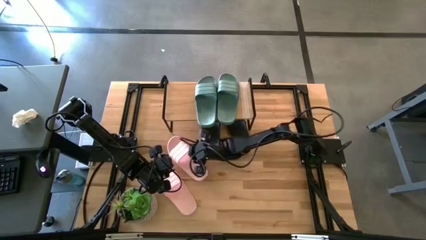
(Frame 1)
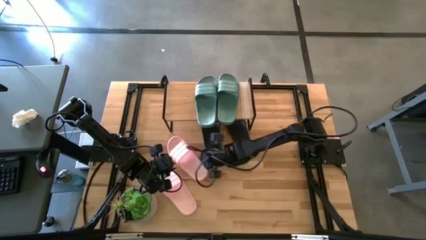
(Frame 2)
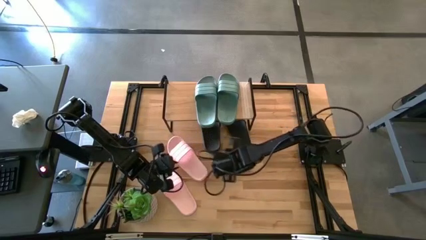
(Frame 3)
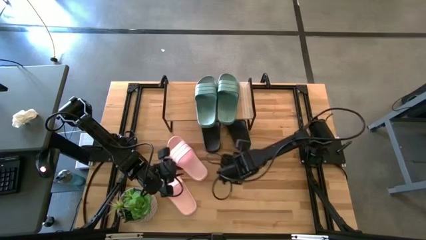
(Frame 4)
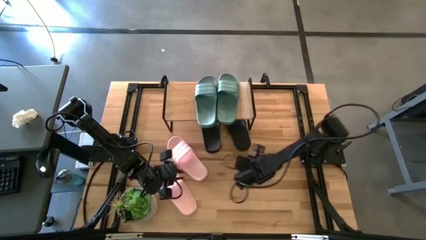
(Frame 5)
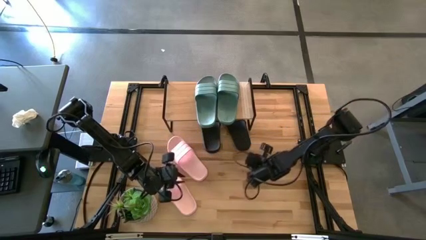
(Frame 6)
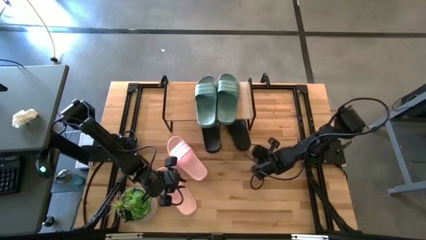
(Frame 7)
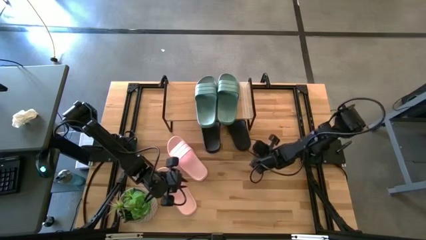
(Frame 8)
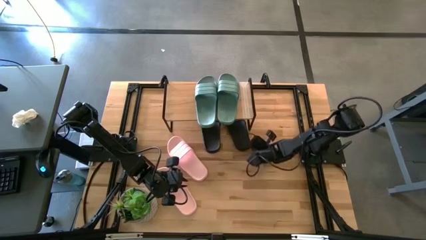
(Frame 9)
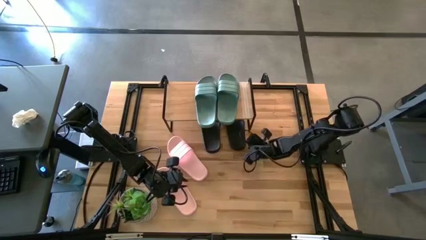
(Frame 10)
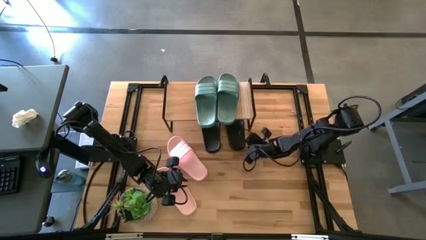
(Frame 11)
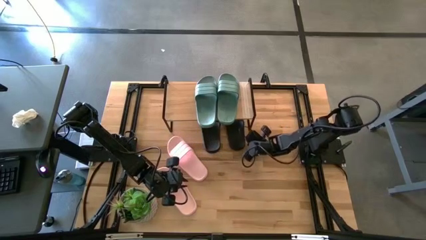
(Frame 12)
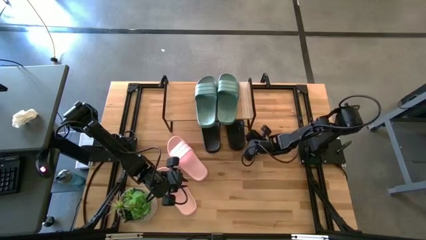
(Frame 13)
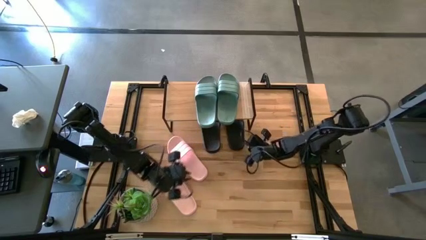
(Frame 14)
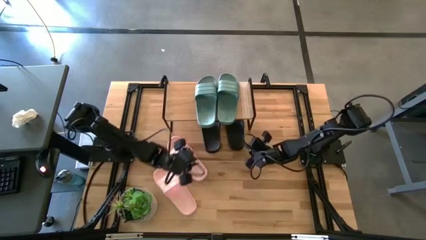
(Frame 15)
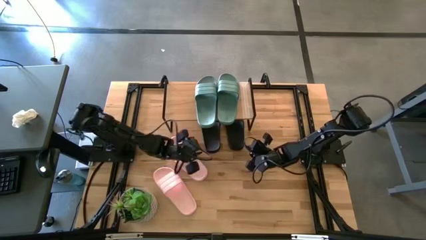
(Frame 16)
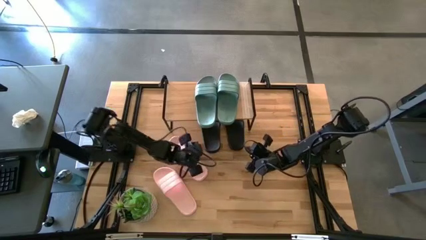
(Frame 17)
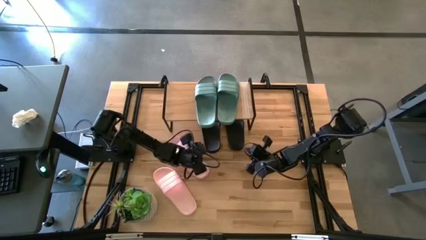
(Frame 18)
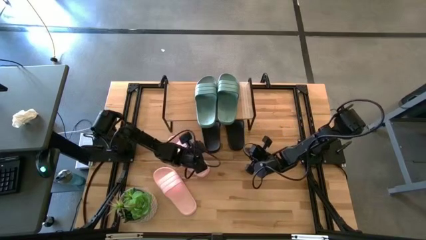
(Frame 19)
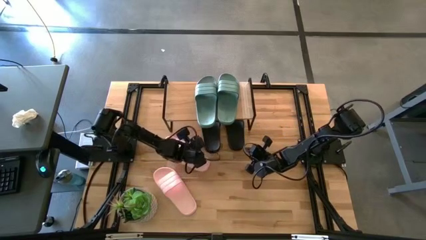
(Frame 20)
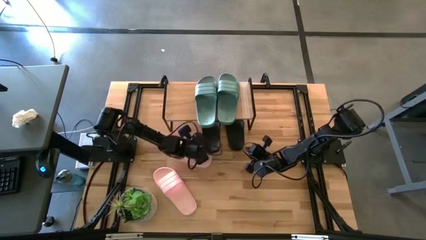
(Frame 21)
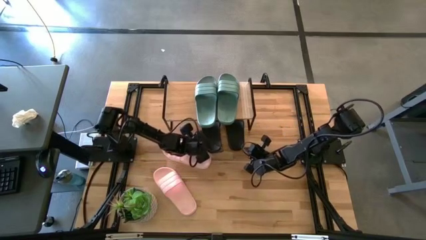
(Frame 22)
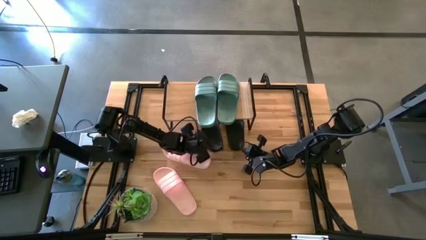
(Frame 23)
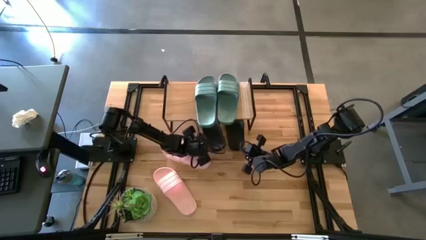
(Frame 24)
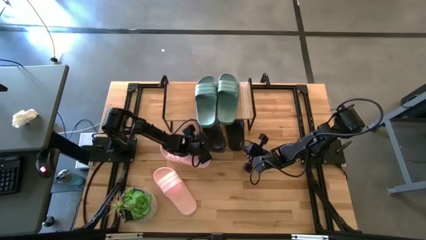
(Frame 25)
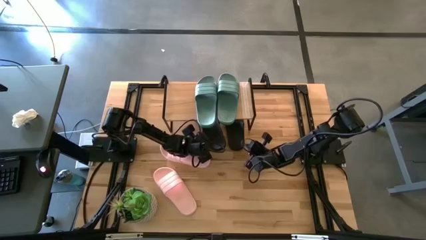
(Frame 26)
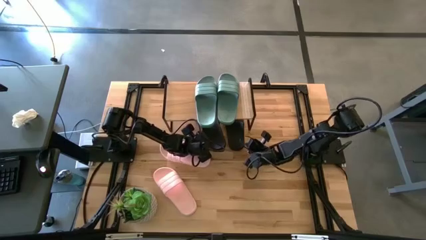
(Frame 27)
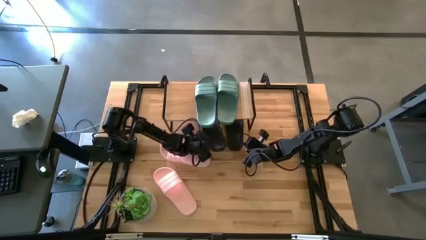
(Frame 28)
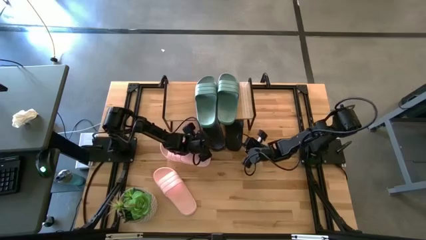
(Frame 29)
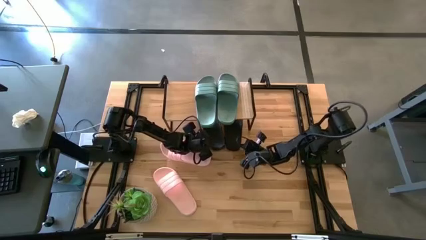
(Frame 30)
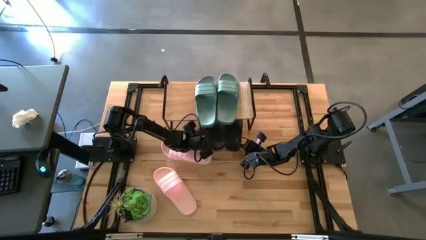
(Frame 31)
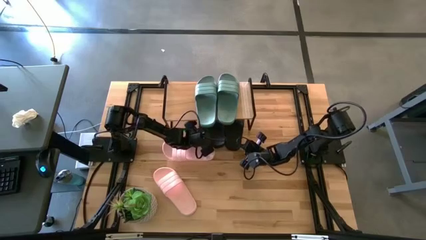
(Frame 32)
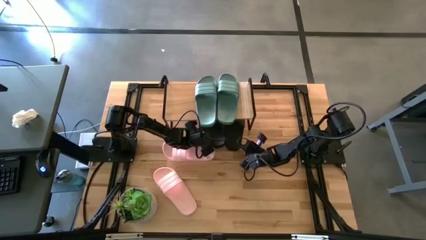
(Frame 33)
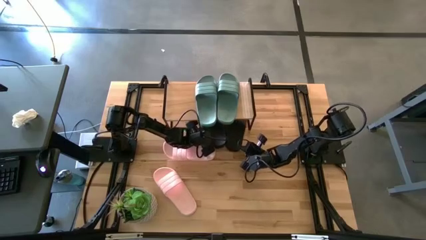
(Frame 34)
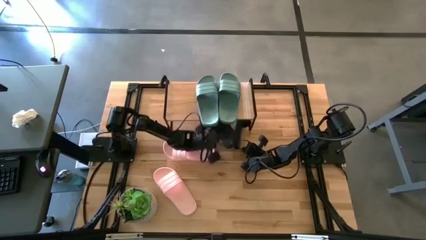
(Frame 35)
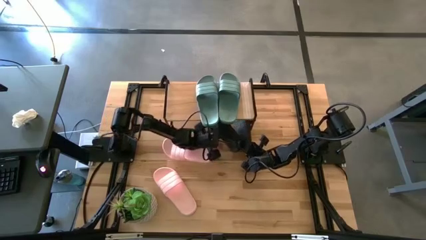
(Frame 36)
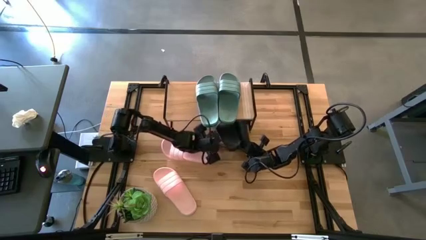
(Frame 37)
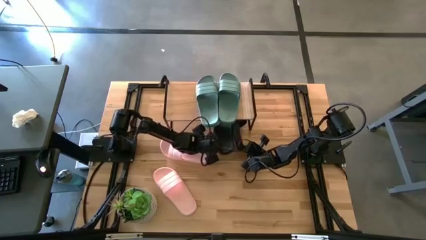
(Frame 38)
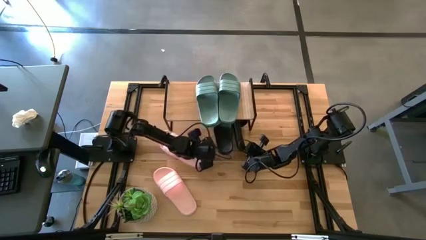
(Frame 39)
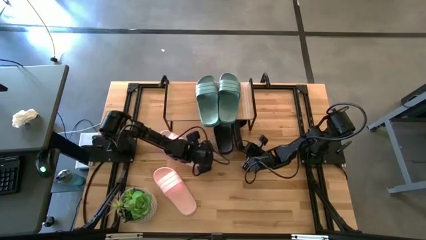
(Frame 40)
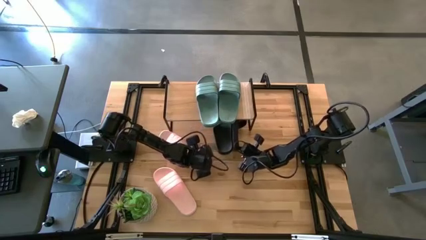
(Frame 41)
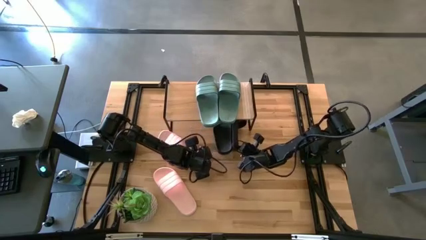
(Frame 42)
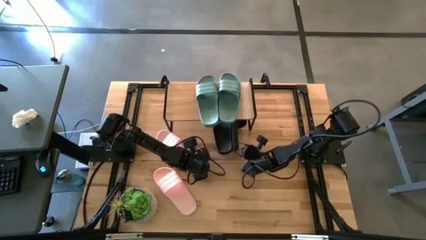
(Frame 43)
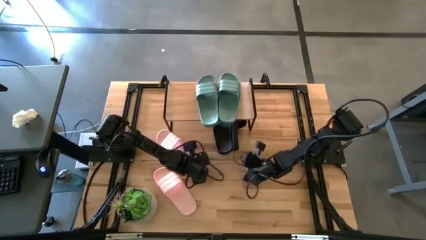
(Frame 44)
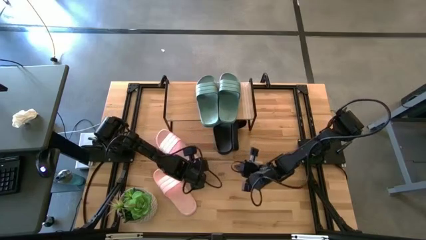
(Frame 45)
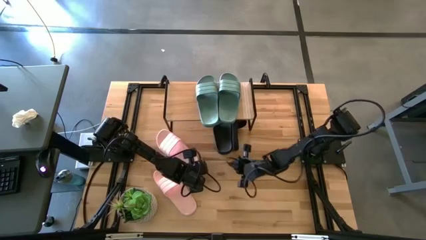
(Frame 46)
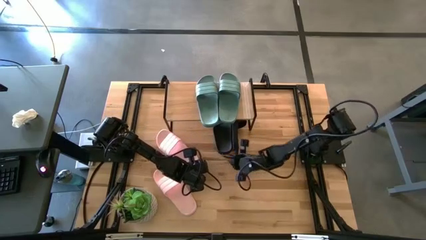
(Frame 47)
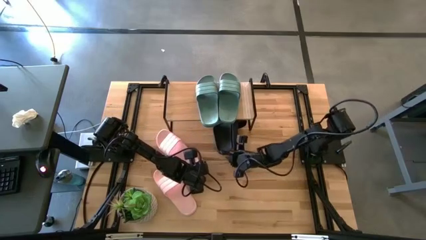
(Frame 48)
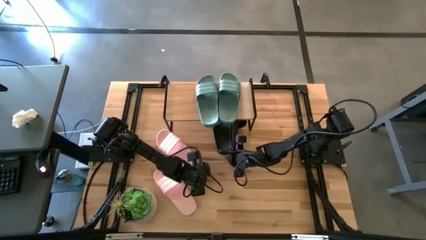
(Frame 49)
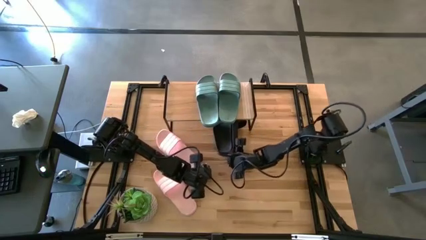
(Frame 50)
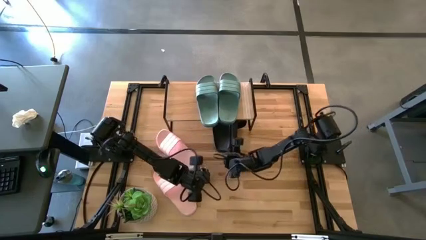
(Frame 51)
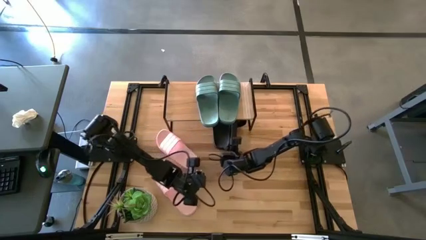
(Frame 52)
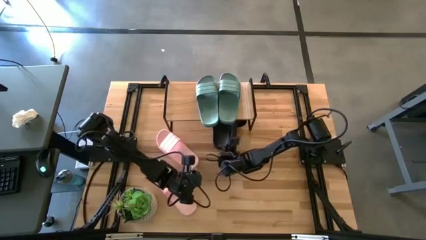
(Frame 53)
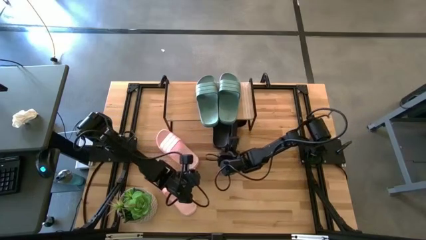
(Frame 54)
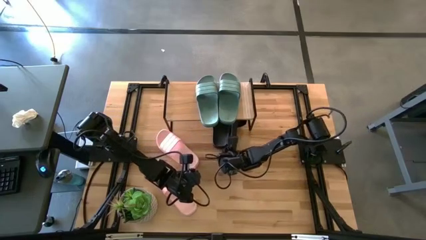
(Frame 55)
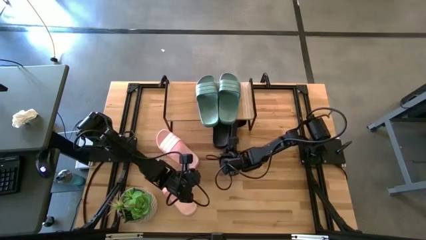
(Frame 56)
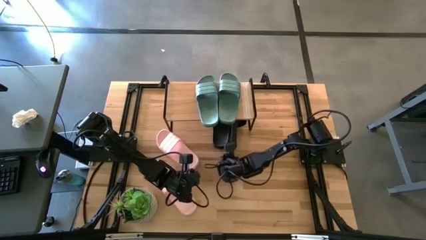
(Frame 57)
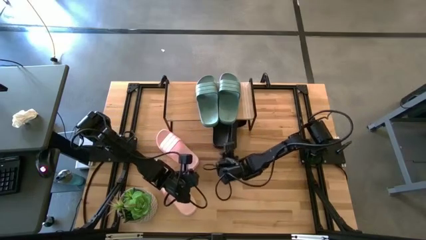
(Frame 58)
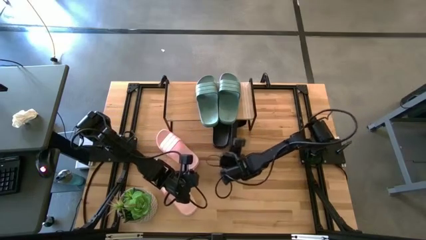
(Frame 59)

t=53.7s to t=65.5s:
Task: Pick and place slides into the shelf
Adjust the black slippers under the shelf
